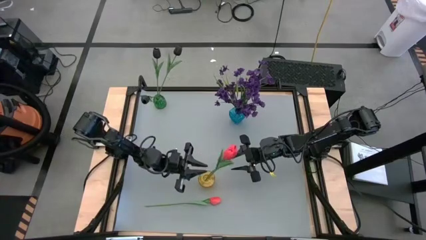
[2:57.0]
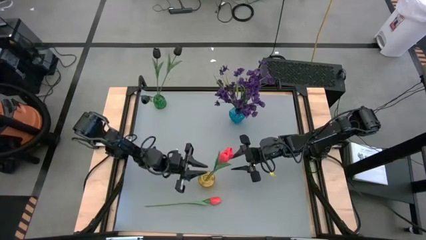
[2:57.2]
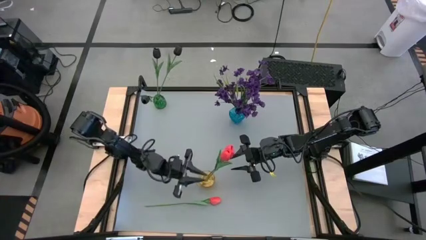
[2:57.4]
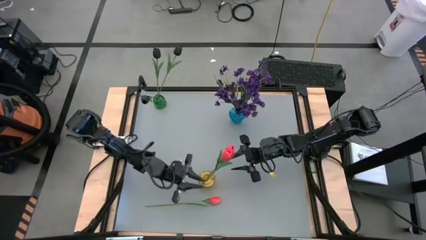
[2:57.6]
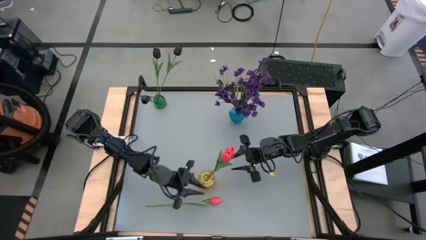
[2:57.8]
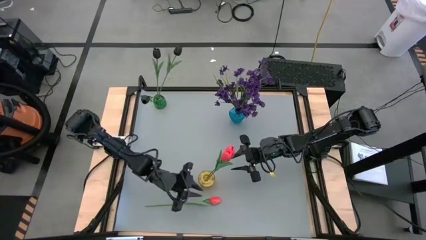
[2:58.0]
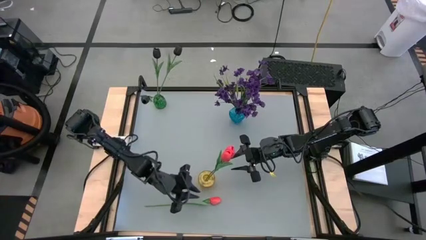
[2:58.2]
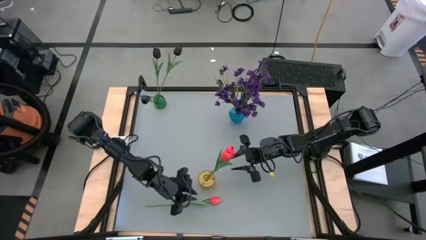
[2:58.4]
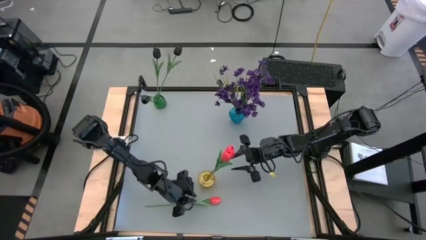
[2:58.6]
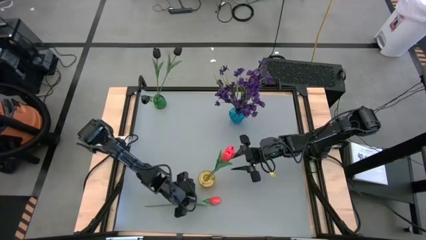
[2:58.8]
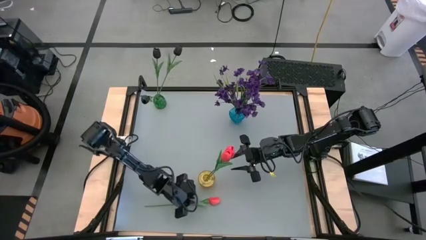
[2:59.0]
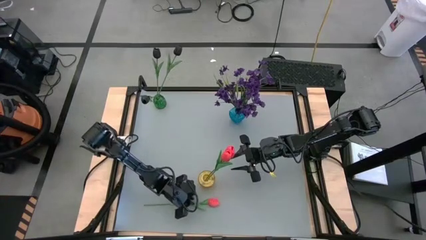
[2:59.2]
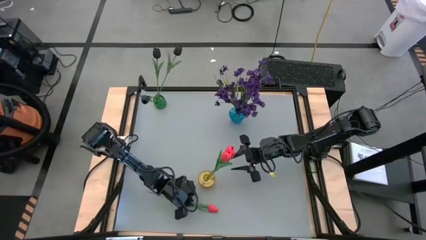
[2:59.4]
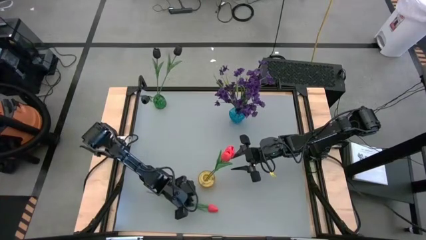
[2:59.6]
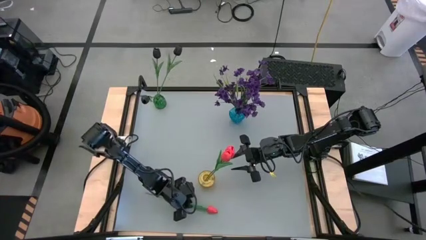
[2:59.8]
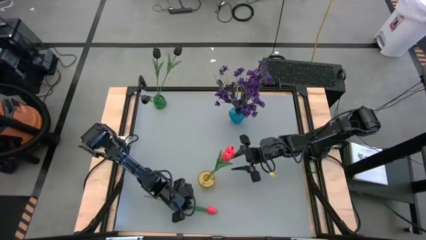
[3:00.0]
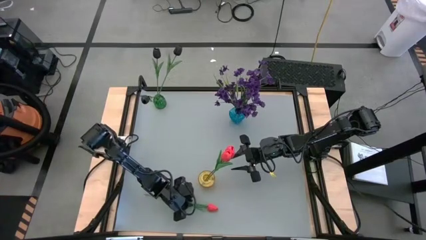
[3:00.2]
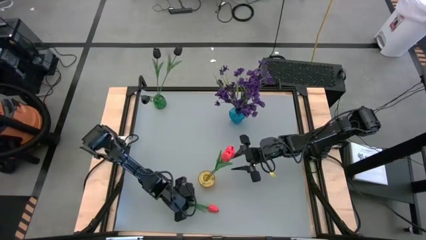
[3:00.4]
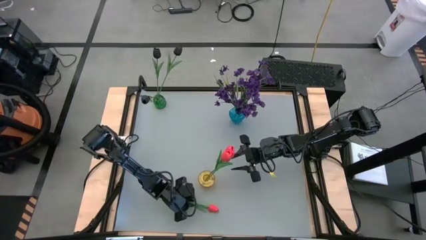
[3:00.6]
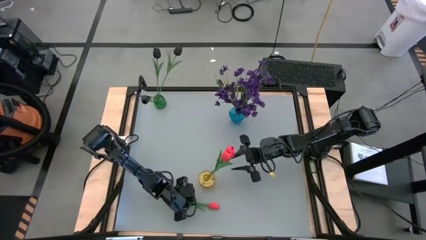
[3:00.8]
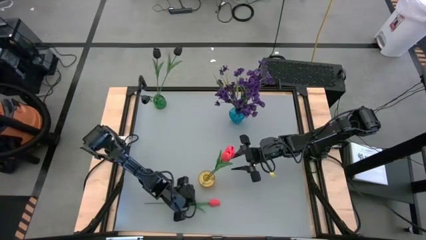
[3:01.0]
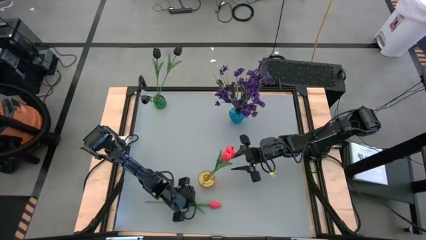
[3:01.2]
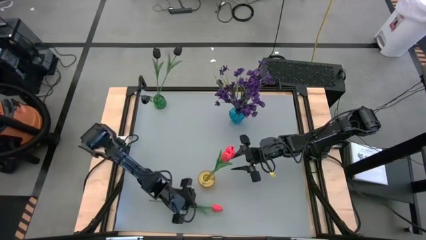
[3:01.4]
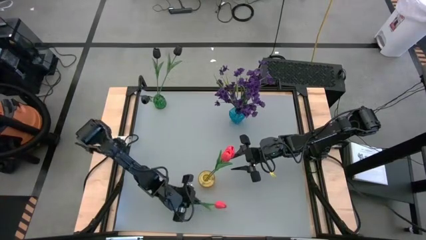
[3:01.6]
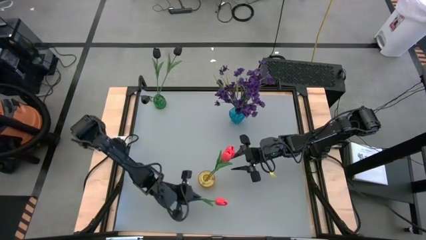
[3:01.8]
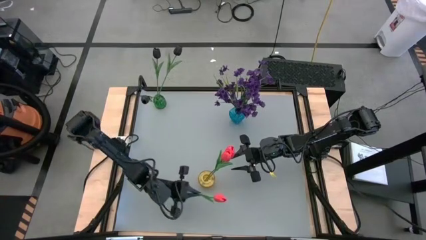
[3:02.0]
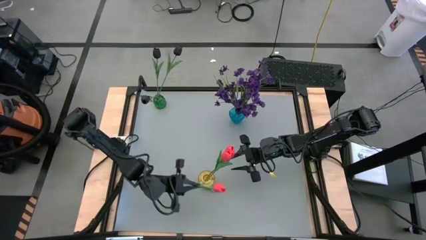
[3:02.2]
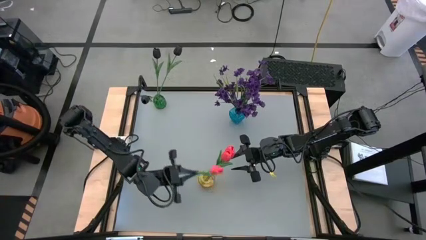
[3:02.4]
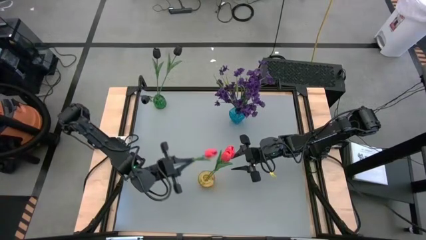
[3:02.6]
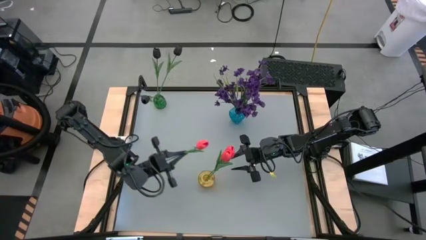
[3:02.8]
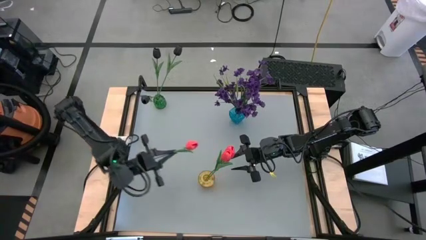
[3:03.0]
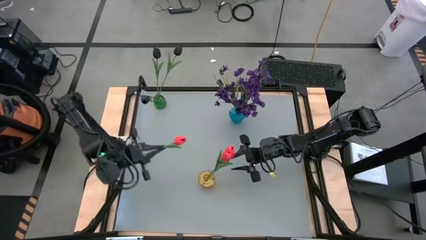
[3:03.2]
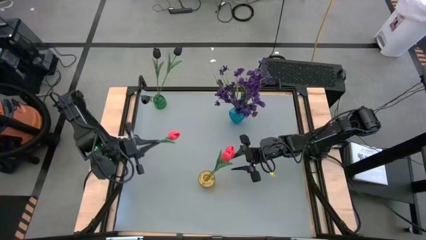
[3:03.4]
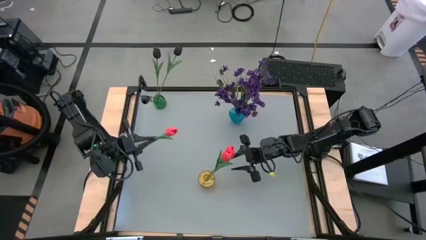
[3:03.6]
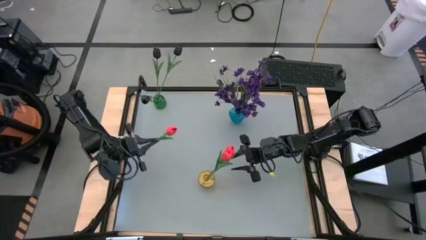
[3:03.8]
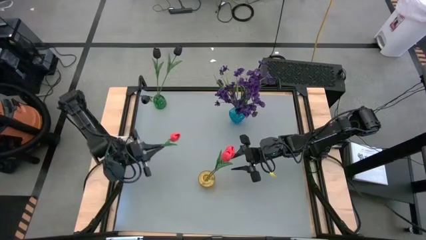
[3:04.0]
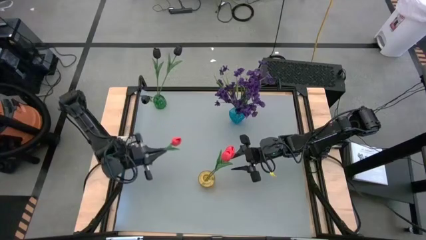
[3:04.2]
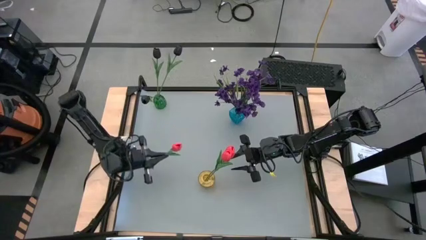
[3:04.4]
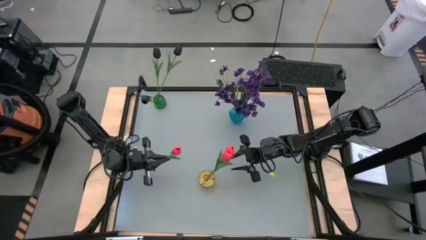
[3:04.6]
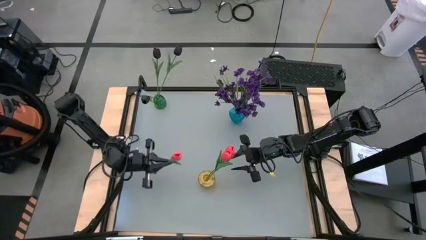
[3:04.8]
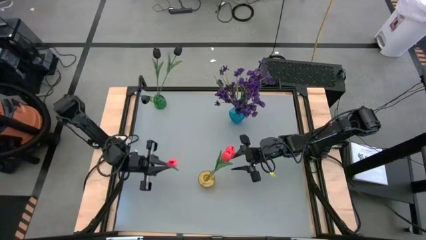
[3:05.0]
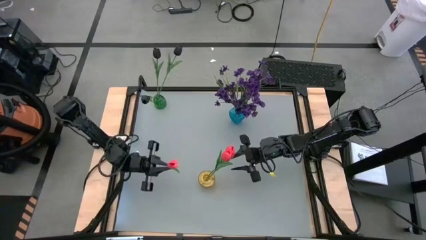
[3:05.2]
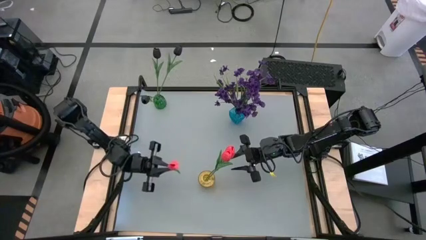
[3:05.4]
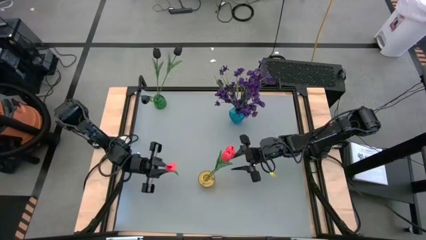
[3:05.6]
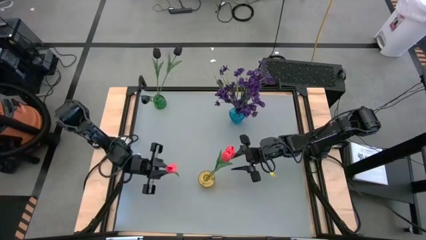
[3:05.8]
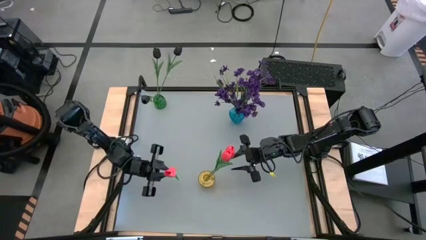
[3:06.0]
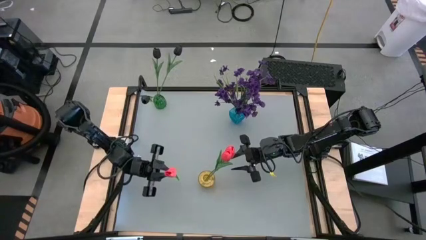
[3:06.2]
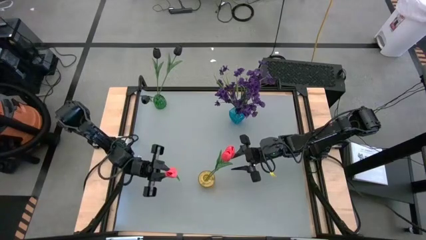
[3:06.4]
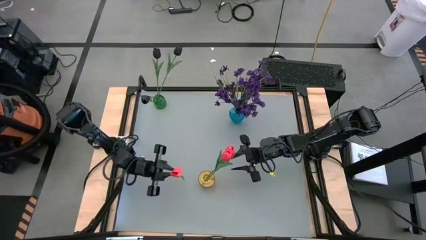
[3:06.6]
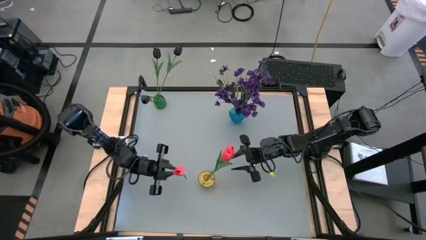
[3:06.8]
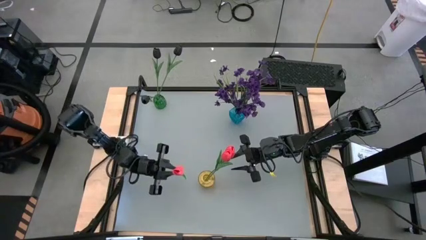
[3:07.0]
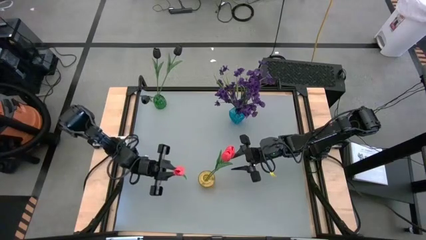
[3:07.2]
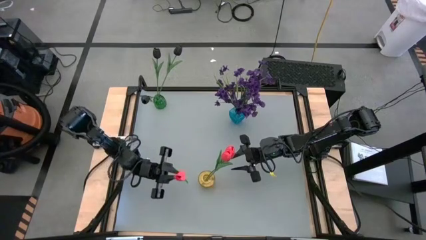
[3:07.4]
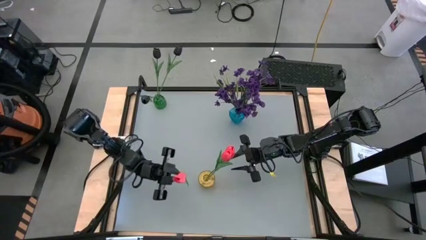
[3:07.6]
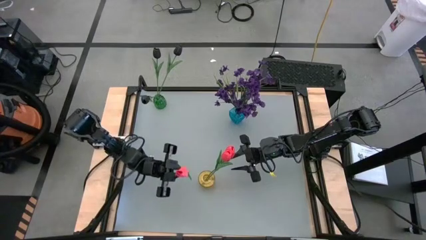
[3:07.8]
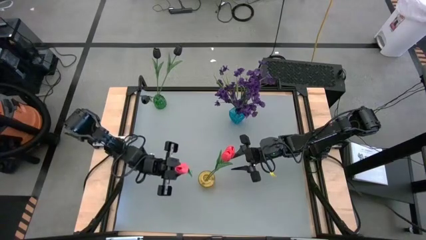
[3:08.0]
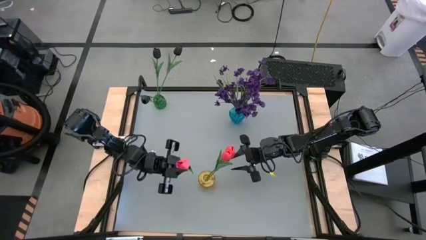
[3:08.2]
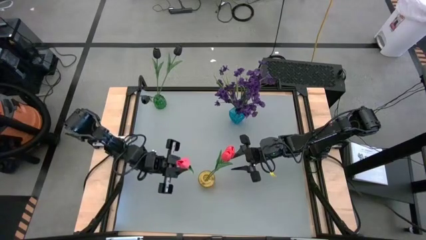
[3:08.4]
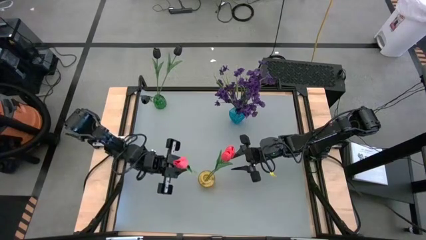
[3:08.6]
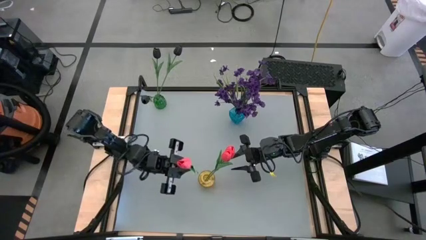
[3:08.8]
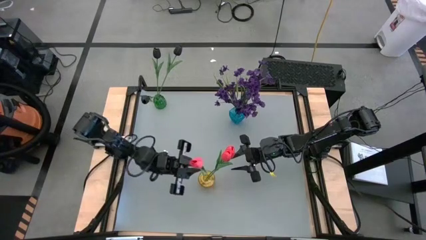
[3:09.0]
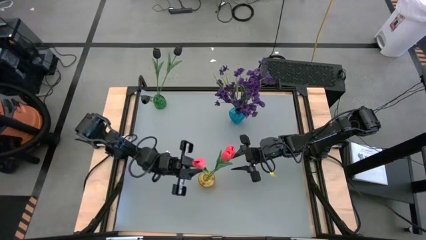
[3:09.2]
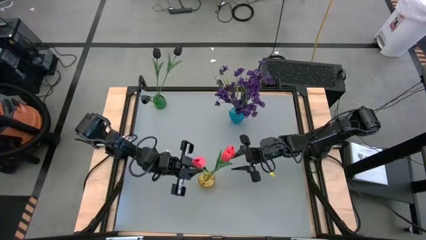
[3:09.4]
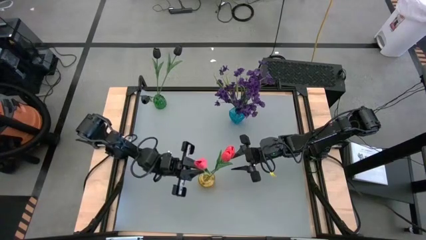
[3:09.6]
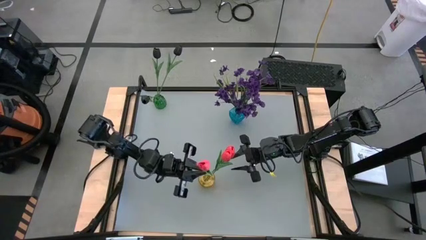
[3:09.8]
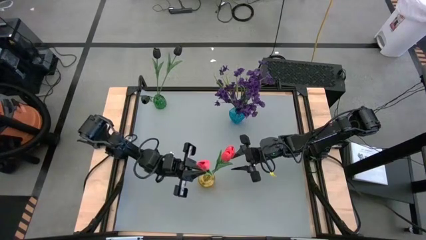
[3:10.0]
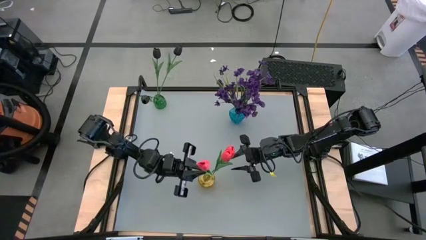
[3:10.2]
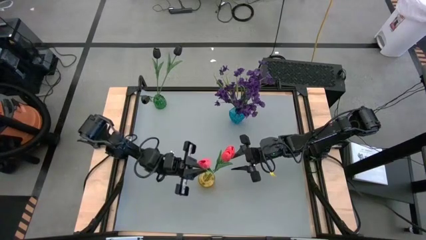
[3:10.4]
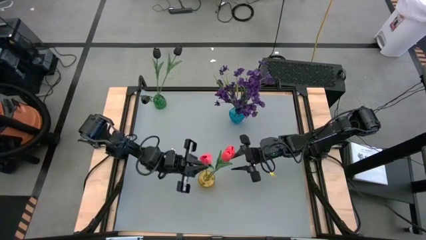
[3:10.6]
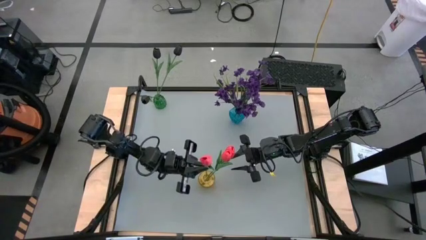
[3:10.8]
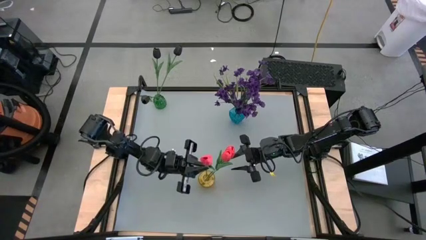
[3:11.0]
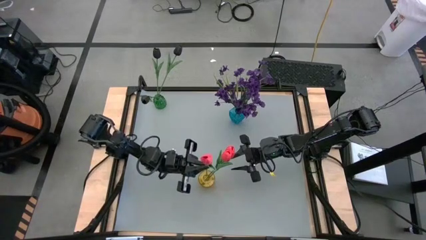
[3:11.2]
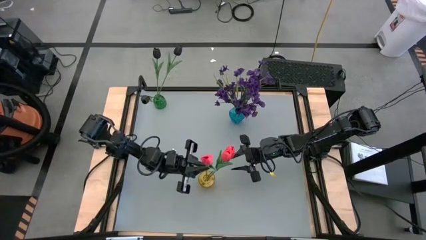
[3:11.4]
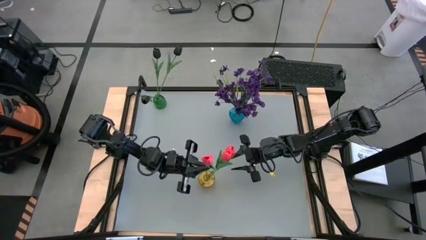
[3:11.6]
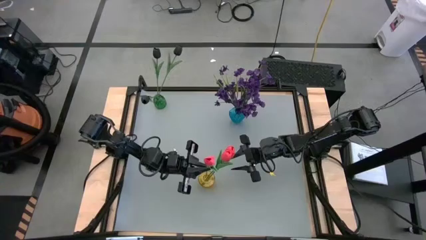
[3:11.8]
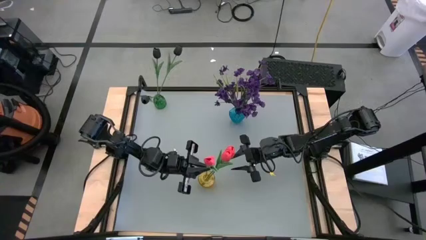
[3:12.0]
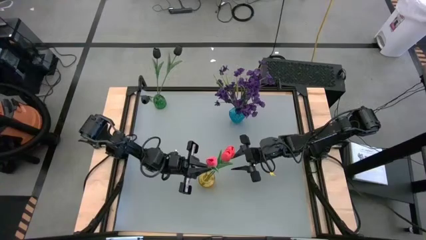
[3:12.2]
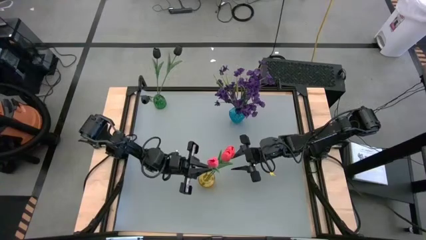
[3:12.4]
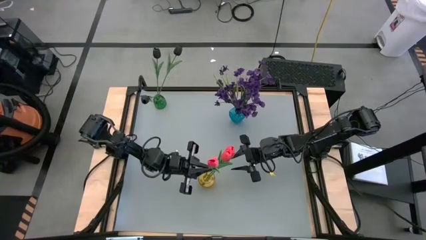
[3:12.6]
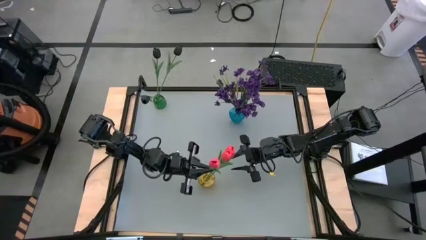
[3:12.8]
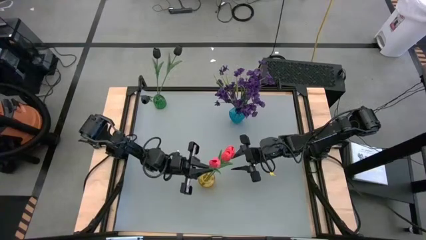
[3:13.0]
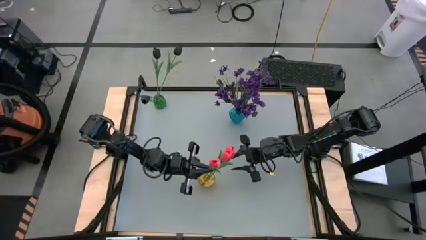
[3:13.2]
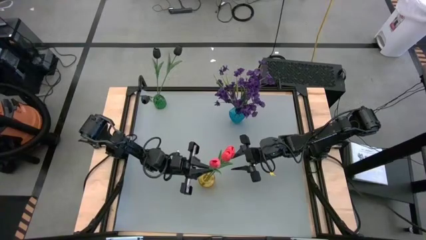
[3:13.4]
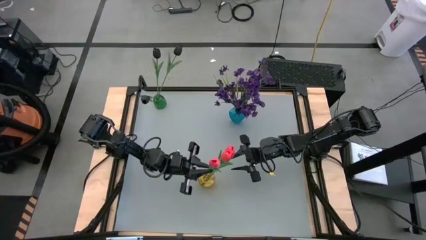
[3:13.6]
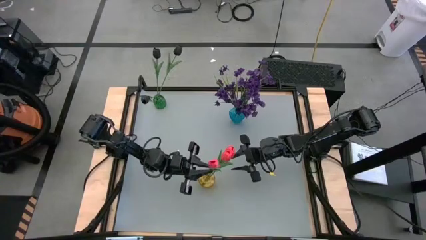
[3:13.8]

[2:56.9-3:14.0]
Task: Sort flowers into vase by color
Put the pink flower into the yellow vase
